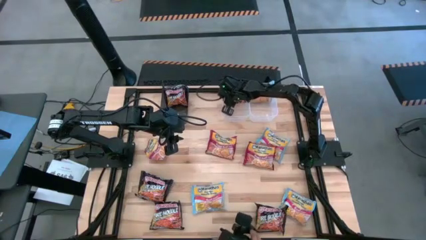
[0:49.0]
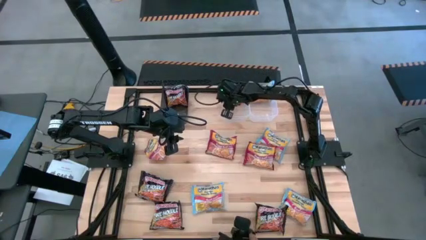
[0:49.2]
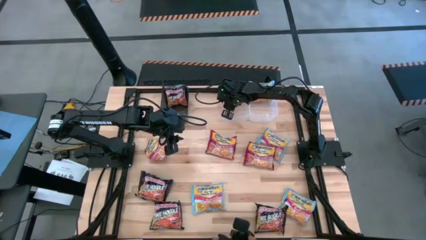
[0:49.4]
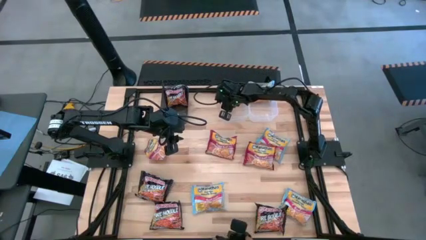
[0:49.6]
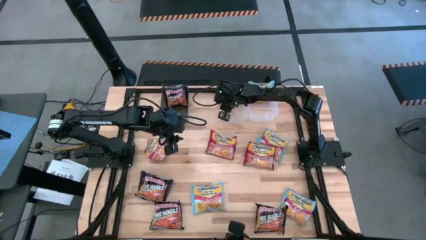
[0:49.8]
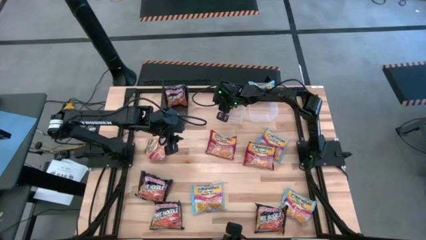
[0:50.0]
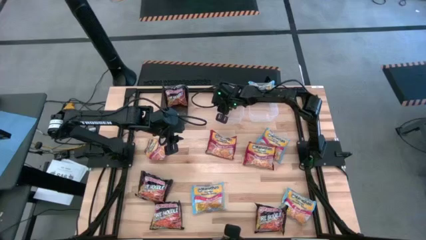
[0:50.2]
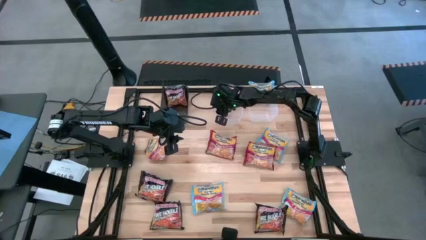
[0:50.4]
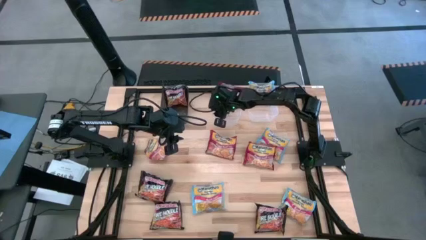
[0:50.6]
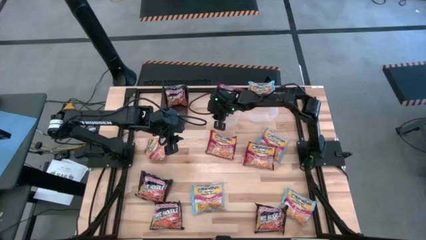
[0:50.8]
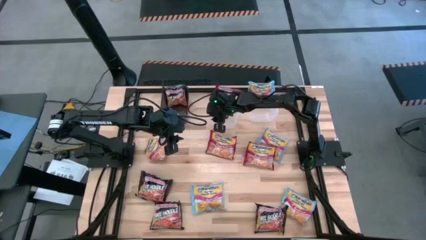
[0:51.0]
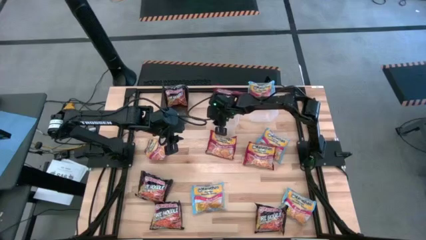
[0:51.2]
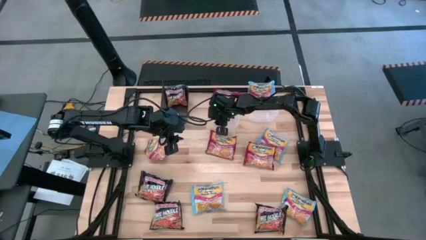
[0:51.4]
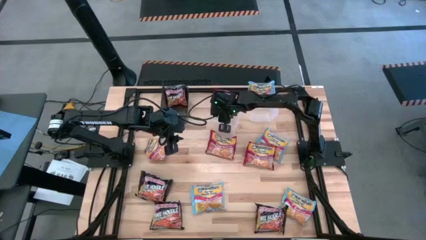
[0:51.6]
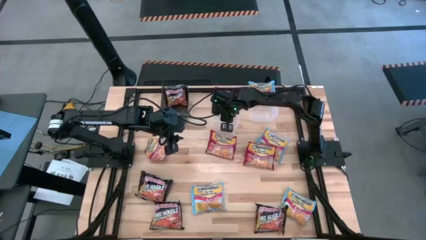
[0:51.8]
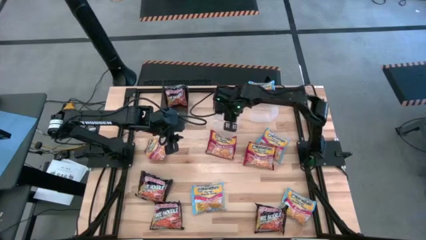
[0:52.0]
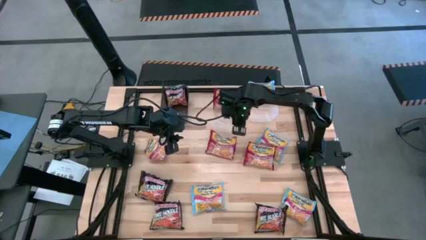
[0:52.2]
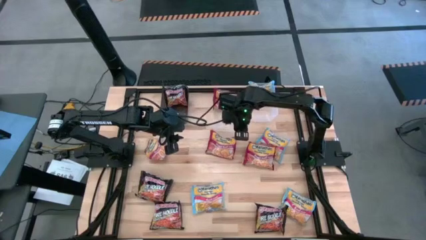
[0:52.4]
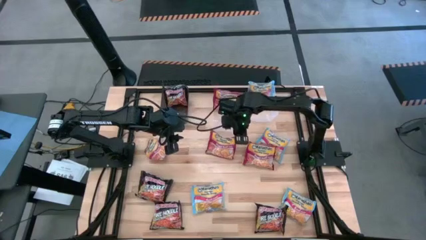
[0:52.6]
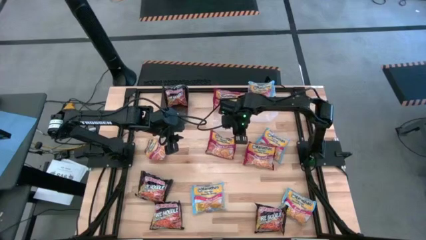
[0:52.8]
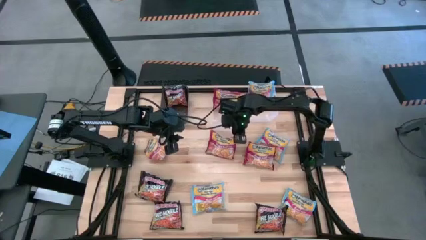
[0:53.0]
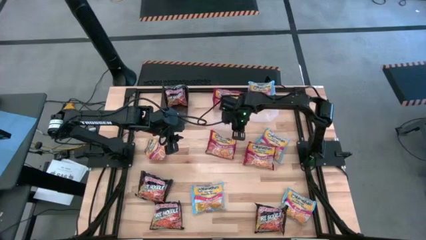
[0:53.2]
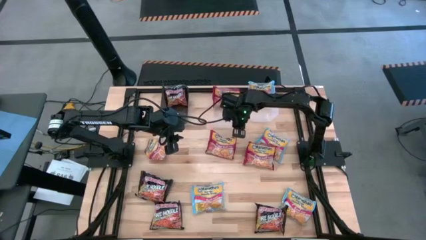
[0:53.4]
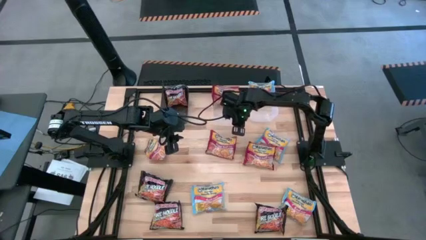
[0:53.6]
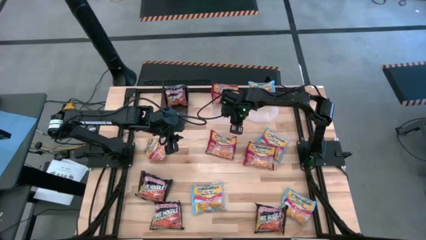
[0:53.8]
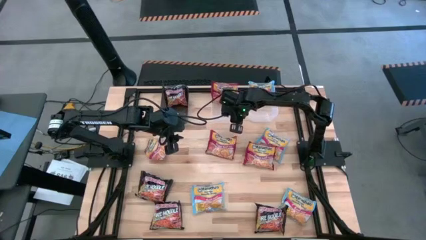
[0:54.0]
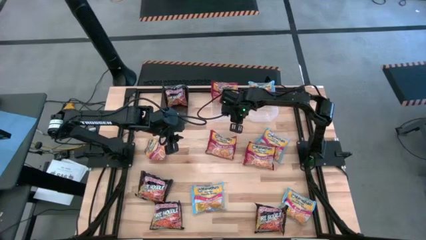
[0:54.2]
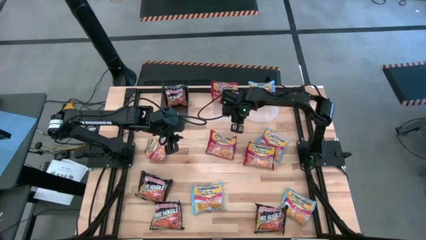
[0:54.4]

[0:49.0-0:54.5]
Task: Sort Maruchan noodles
Adjust the transparent bin on the table

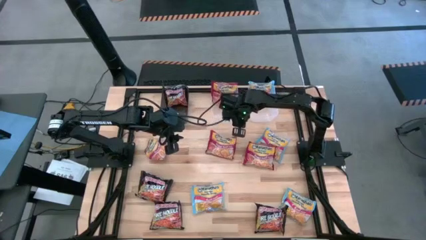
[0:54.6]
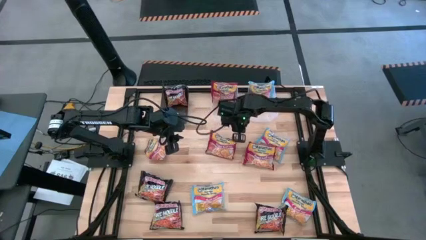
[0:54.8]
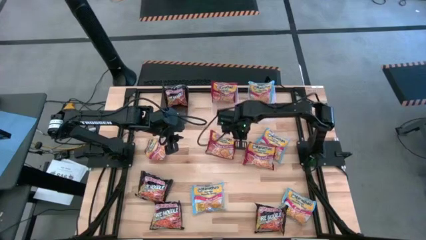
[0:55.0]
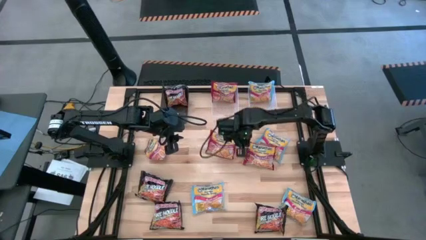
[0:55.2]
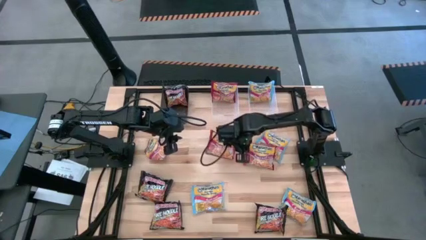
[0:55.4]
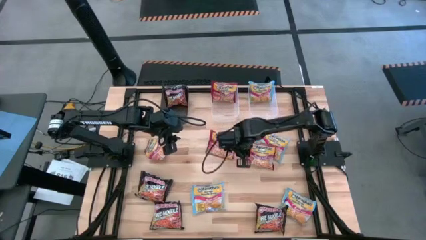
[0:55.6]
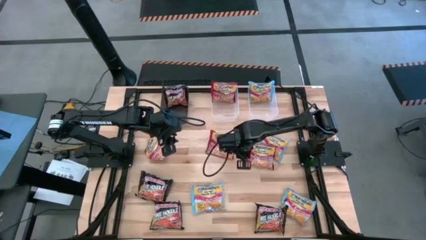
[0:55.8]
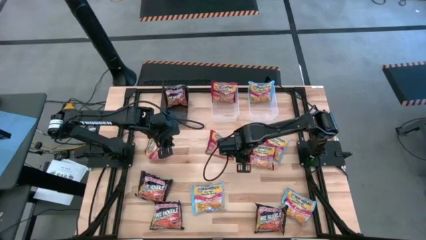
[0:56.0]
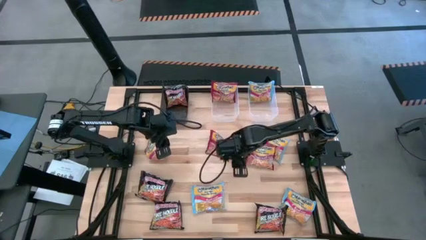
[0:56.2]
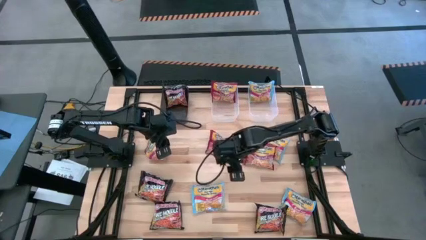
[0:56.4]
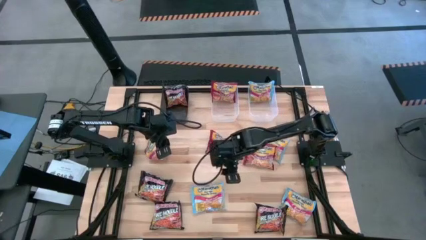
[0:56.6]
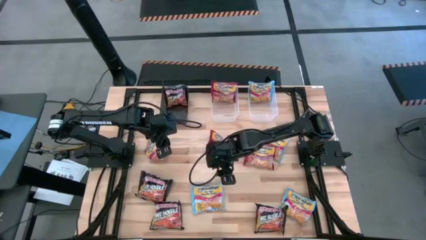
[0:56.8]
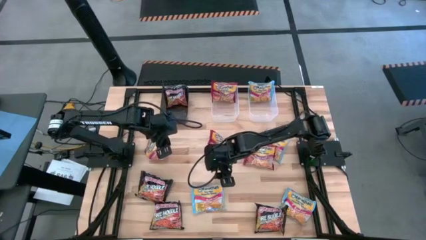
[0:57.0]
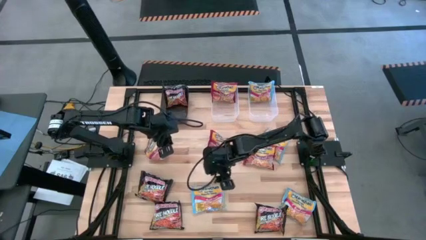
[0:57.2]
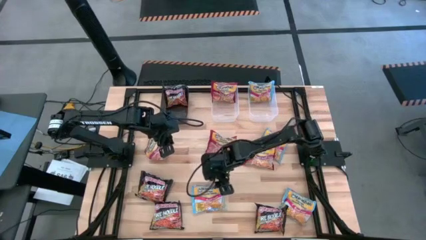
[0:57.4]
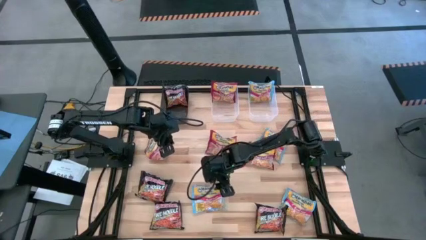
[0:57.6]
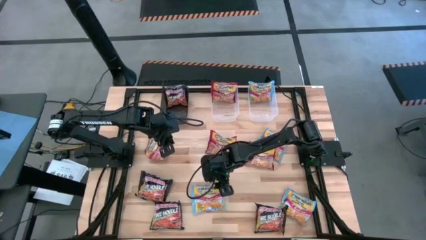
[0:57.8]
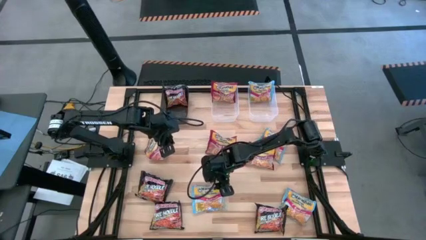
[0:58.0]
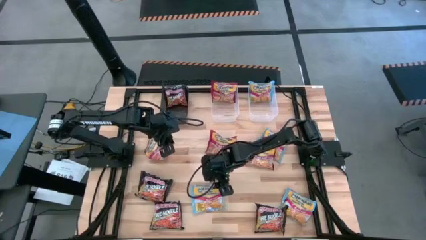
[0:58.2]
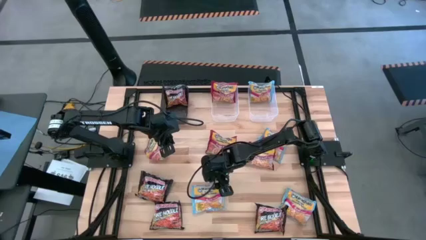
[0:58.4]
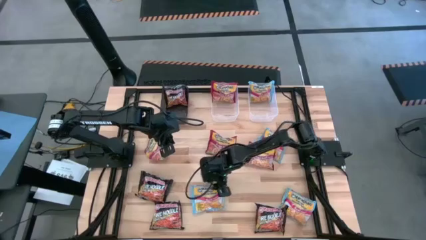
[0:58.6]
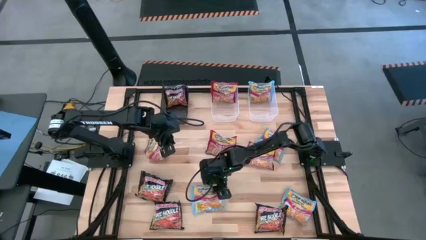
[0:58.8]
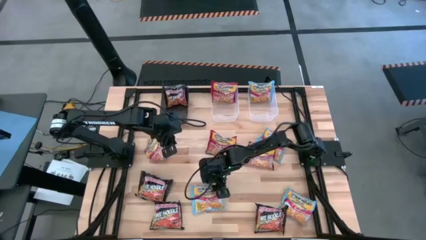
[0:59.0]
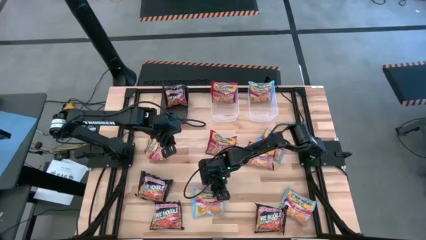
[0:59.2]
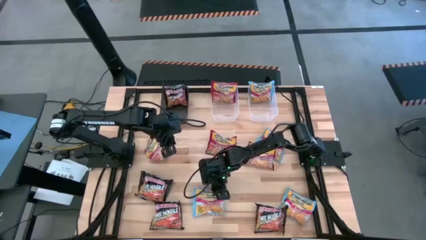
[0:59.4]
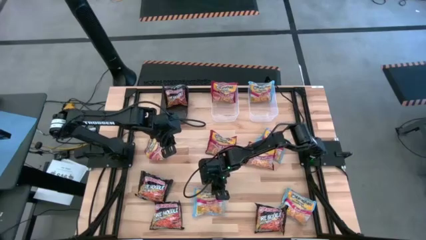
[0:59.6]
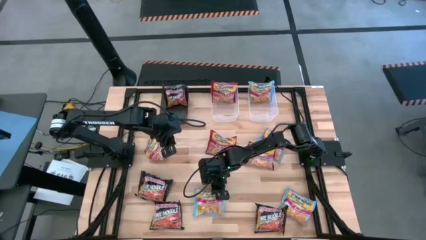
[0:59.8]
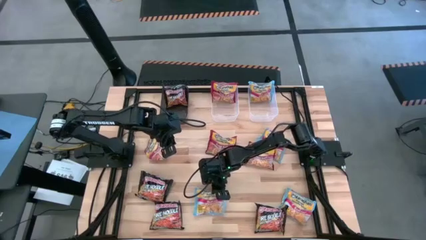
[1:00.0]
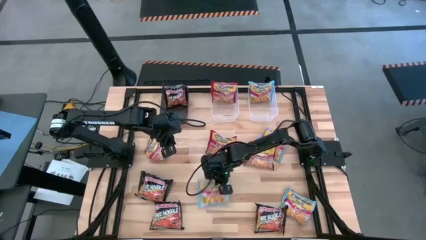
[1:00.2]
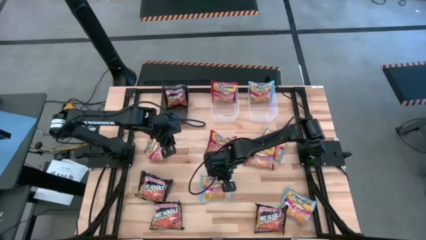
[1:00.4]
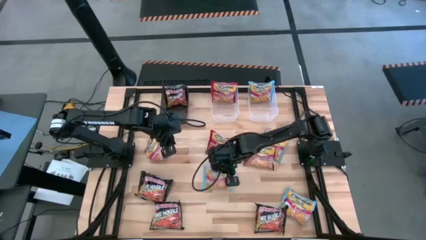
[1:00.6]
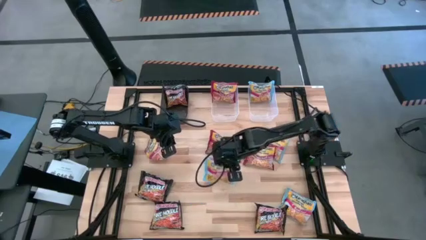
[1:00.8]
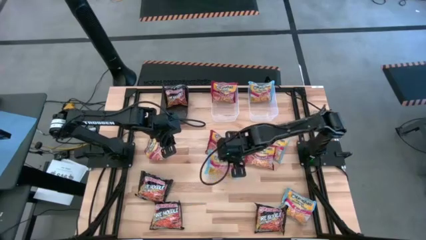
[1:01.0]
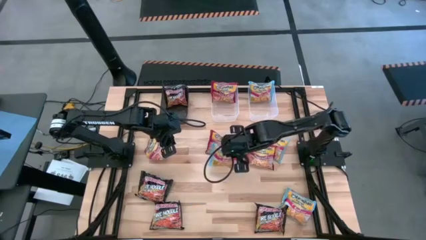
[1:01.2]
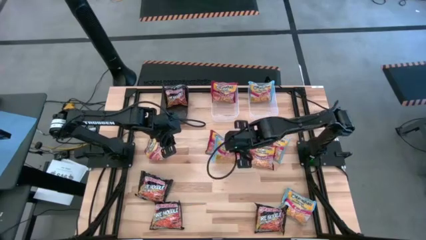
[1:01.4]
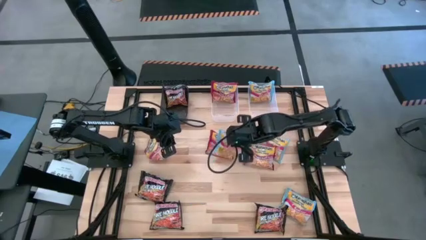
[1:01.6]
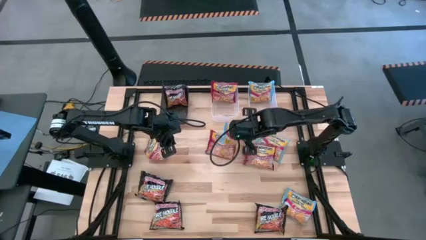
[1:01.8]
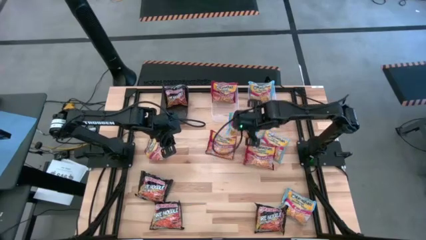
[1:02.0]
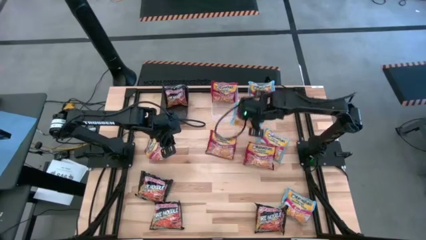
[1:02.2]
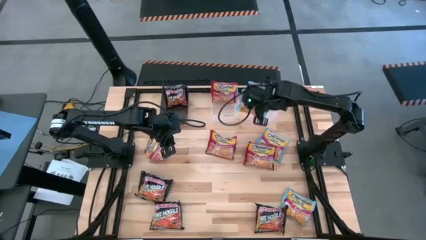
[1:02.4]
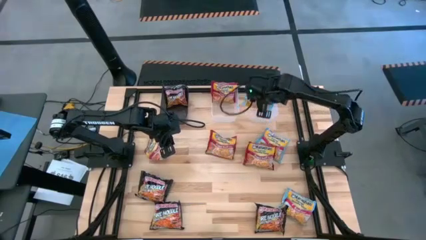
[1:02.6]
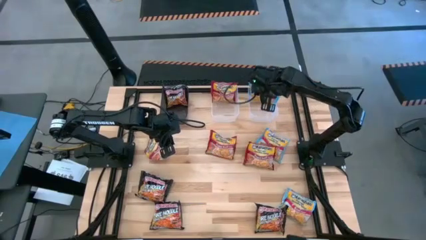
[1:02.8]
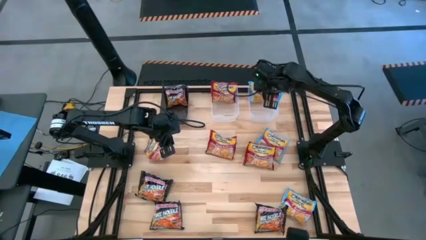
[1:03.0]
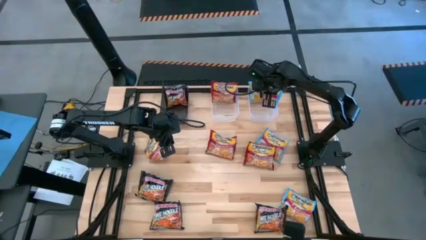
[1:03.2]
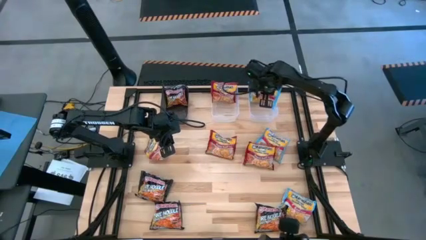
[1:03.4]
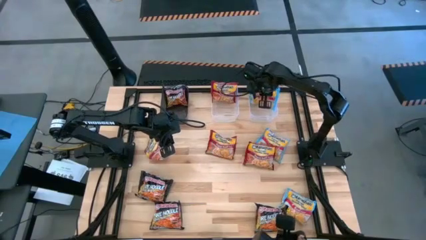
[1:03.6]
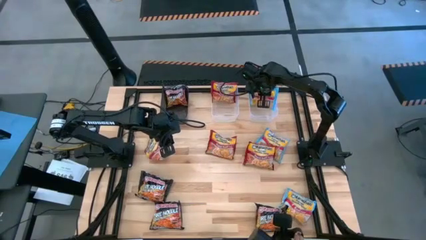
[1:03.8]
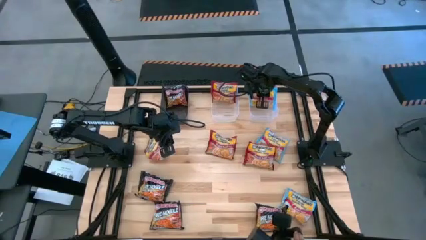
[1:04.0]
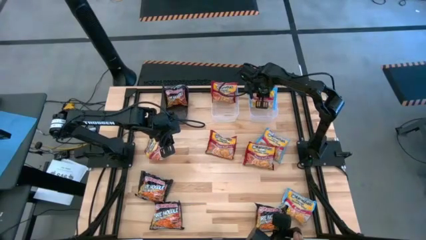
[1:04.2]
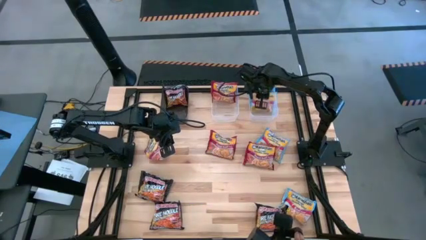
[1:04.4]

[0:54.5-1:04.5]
Put the light blue noodle pack into the right transparent bin
